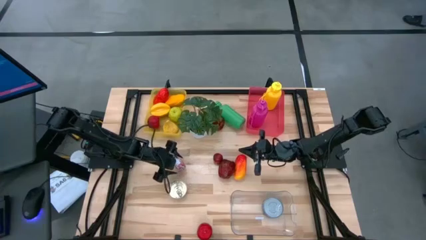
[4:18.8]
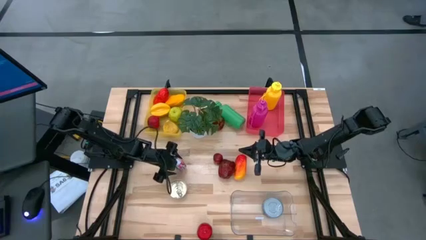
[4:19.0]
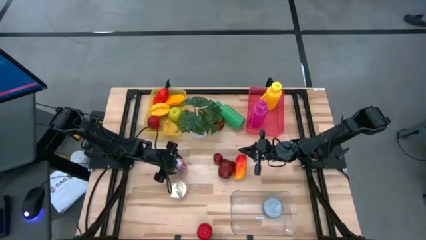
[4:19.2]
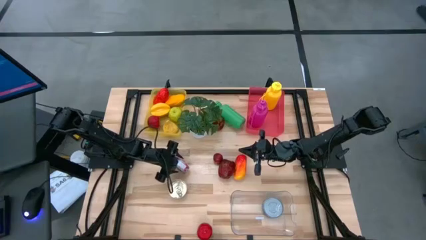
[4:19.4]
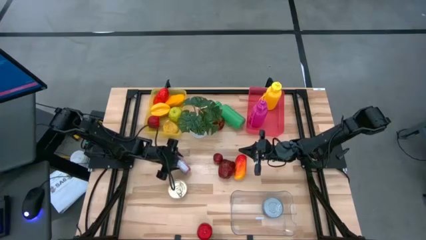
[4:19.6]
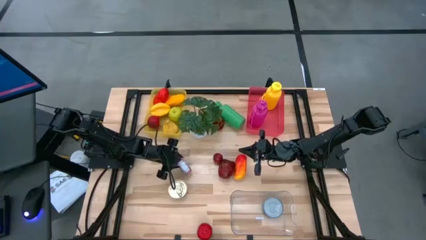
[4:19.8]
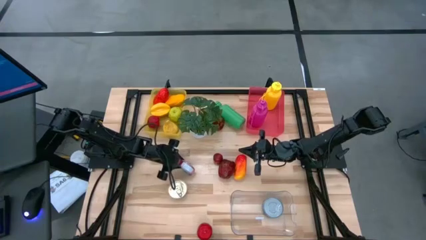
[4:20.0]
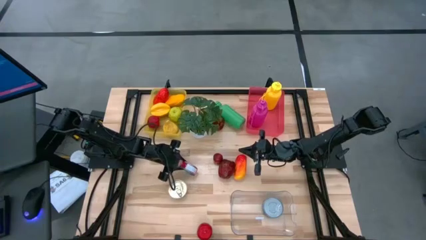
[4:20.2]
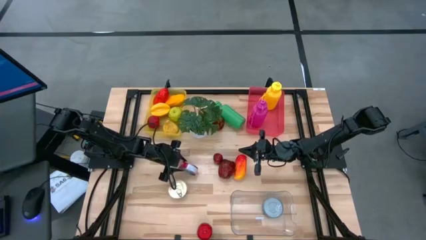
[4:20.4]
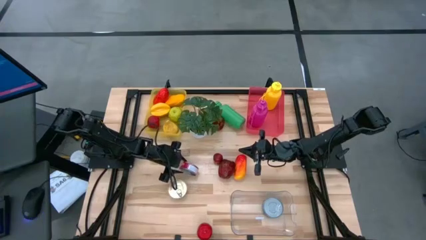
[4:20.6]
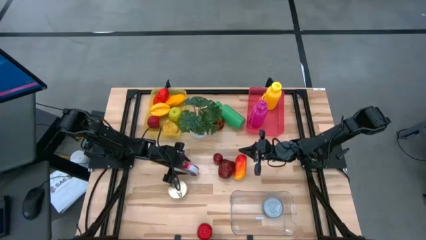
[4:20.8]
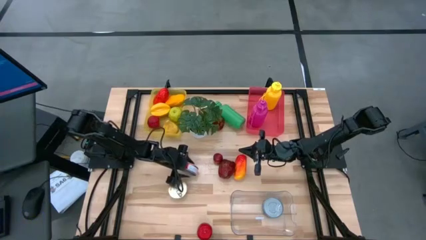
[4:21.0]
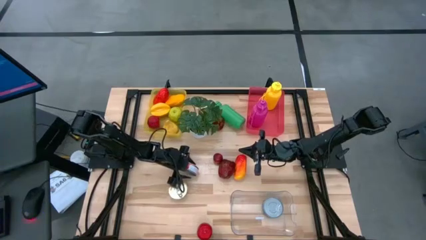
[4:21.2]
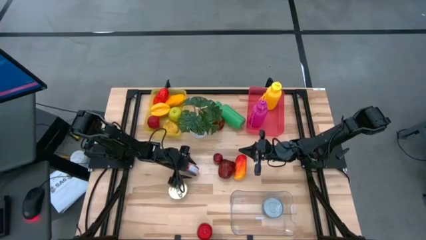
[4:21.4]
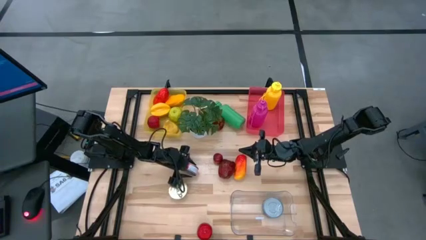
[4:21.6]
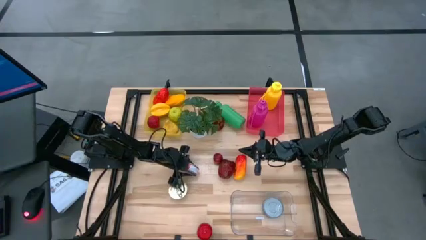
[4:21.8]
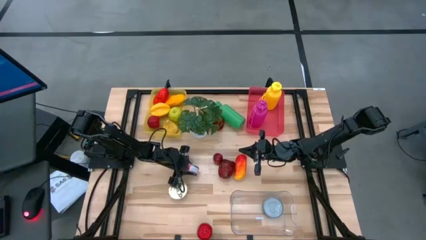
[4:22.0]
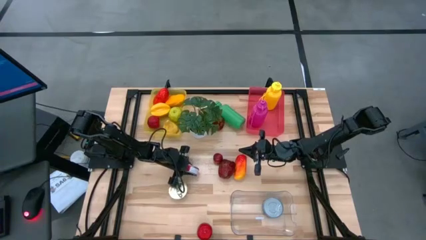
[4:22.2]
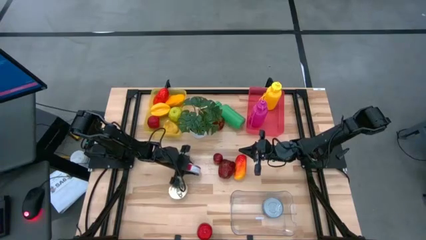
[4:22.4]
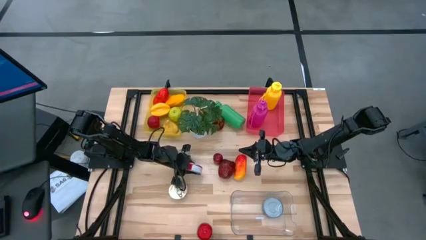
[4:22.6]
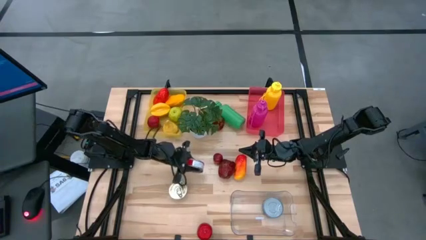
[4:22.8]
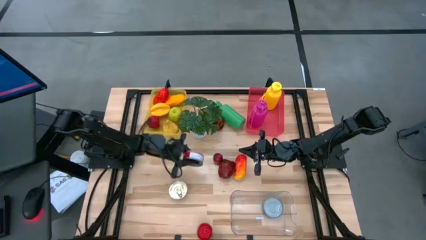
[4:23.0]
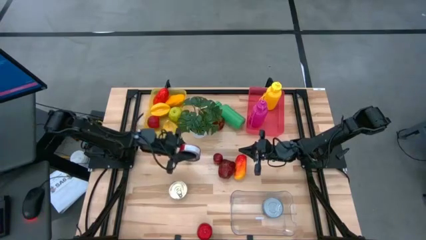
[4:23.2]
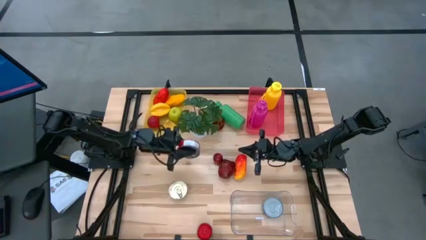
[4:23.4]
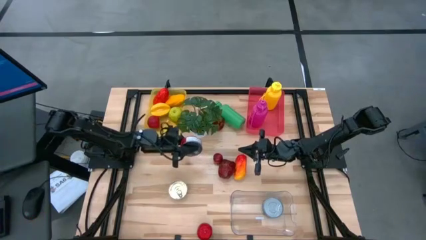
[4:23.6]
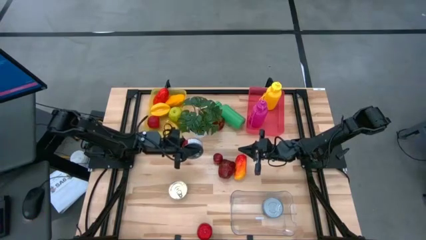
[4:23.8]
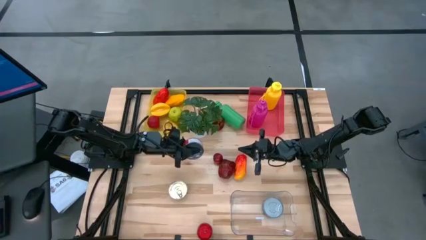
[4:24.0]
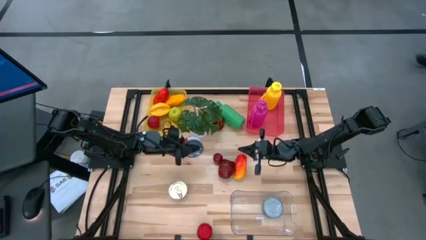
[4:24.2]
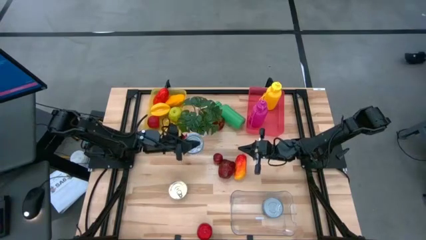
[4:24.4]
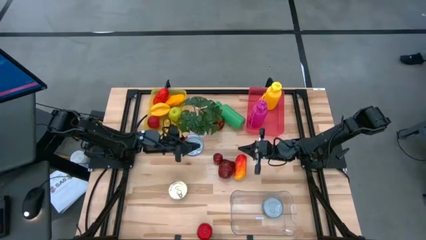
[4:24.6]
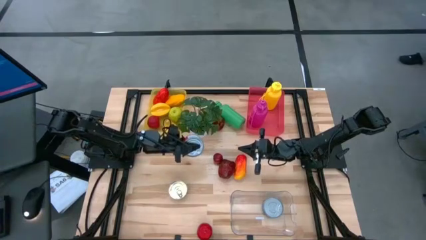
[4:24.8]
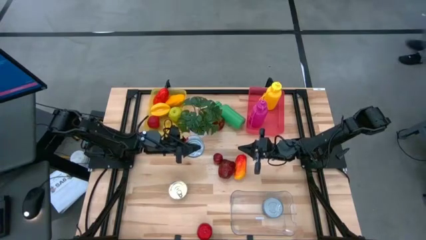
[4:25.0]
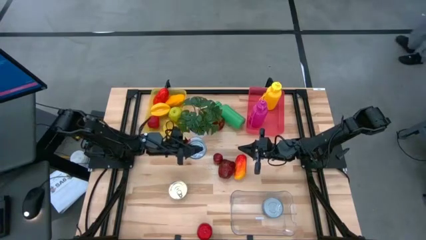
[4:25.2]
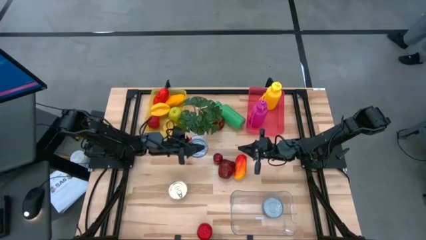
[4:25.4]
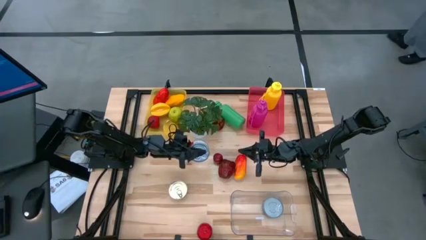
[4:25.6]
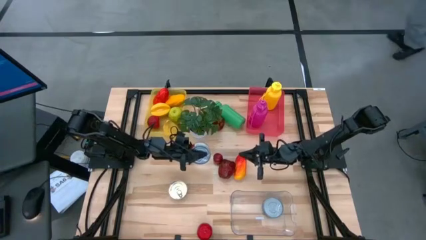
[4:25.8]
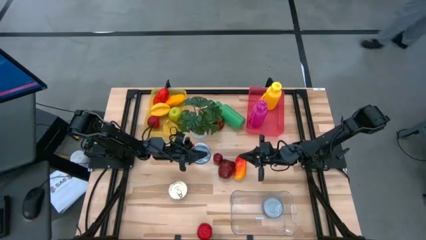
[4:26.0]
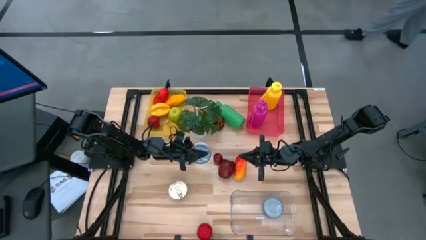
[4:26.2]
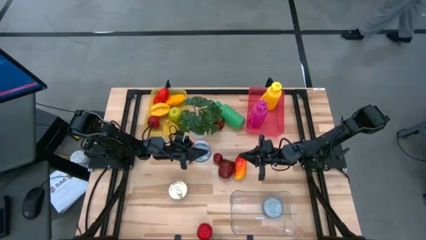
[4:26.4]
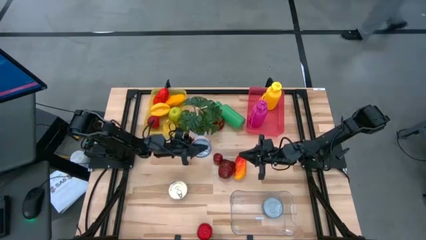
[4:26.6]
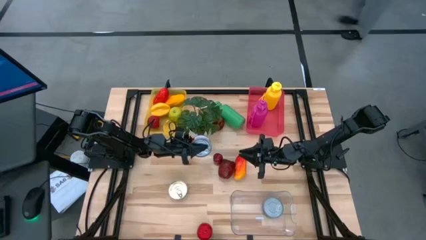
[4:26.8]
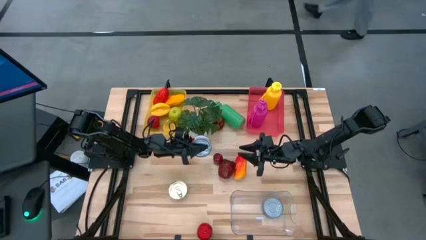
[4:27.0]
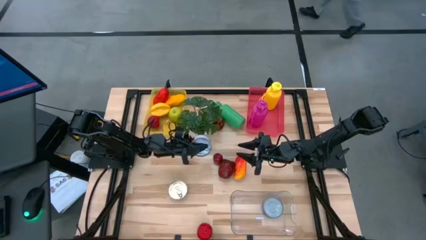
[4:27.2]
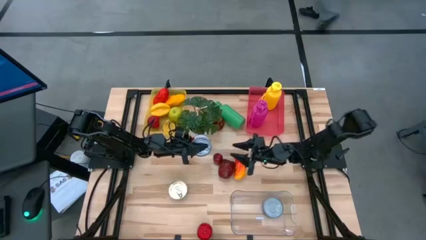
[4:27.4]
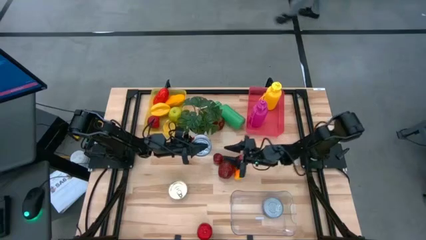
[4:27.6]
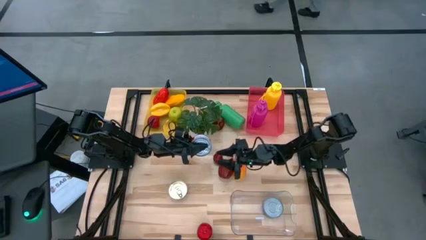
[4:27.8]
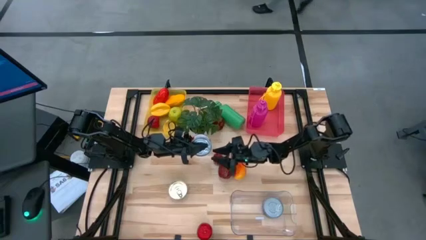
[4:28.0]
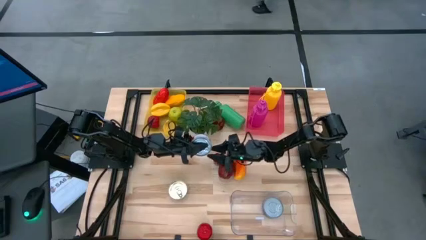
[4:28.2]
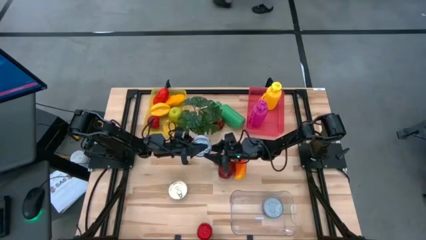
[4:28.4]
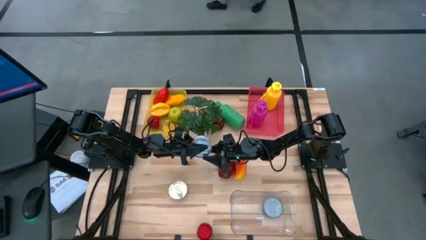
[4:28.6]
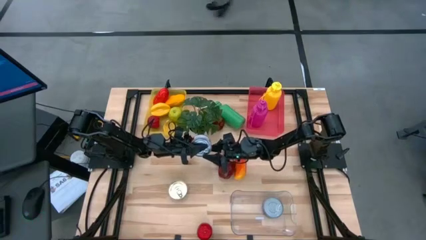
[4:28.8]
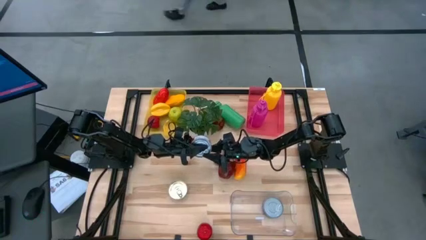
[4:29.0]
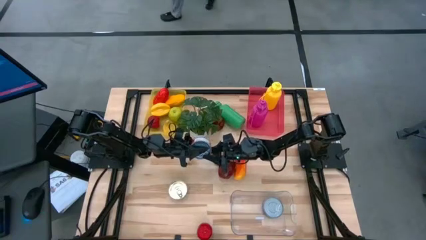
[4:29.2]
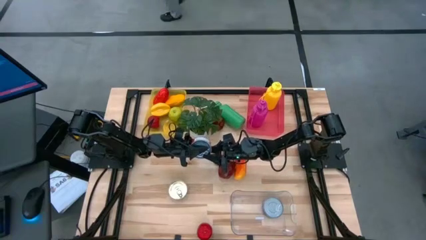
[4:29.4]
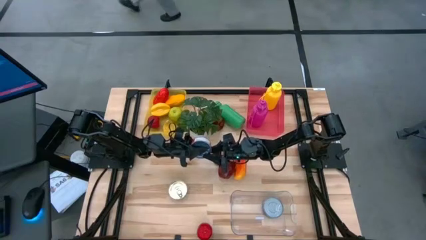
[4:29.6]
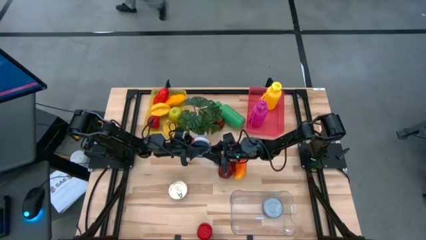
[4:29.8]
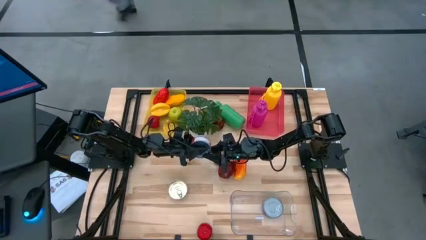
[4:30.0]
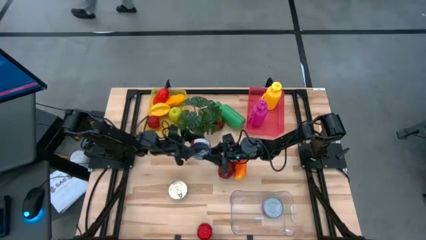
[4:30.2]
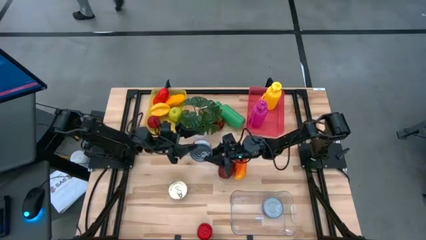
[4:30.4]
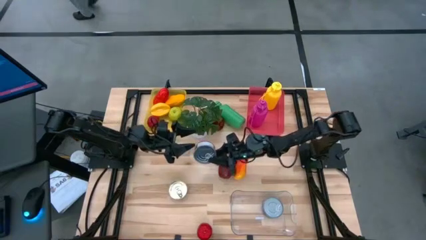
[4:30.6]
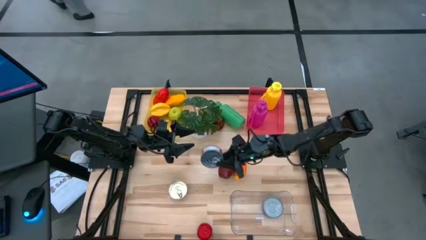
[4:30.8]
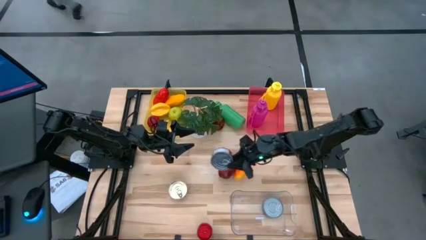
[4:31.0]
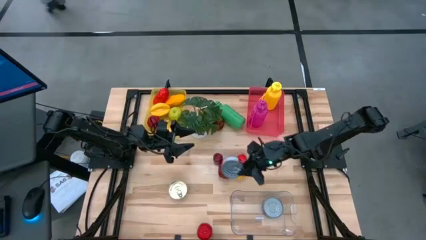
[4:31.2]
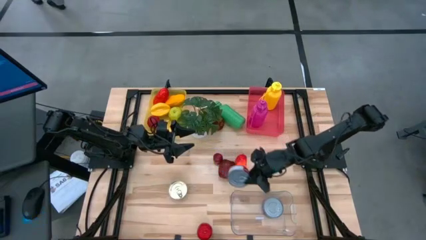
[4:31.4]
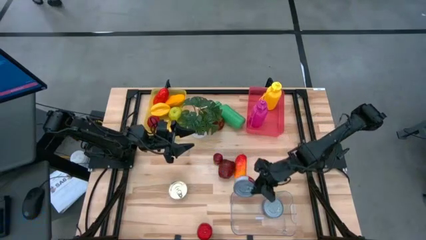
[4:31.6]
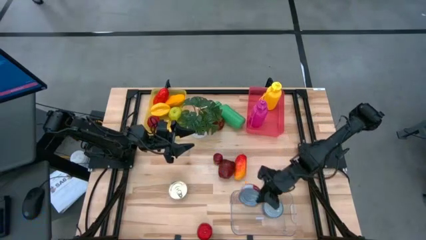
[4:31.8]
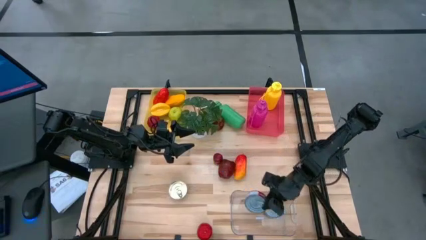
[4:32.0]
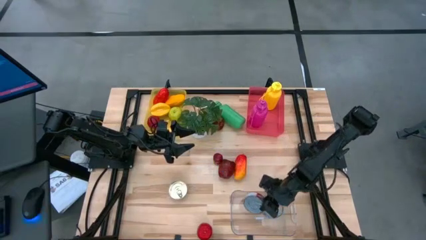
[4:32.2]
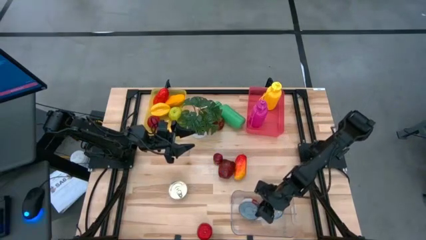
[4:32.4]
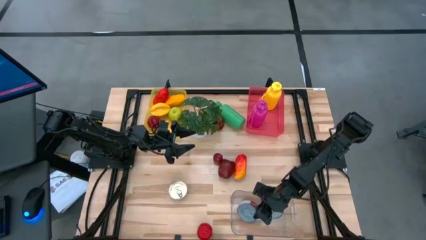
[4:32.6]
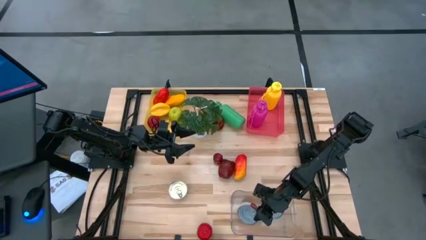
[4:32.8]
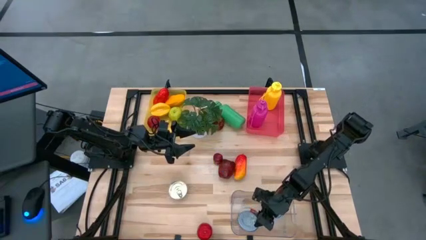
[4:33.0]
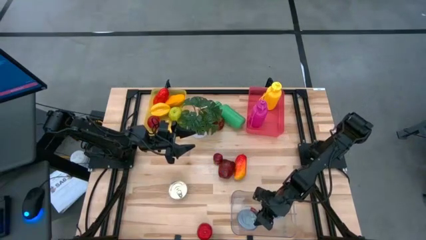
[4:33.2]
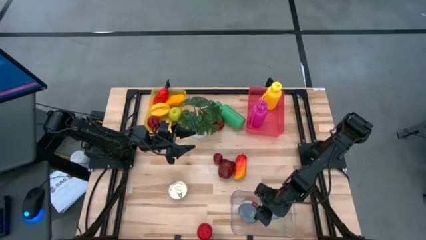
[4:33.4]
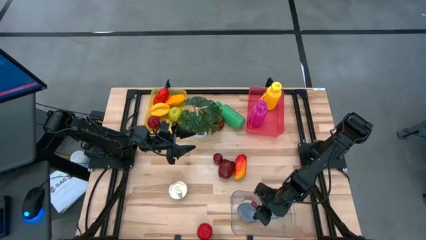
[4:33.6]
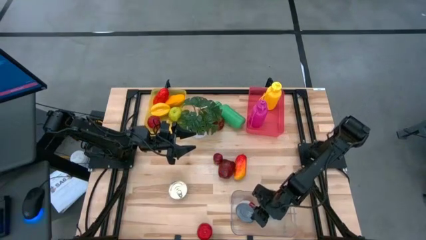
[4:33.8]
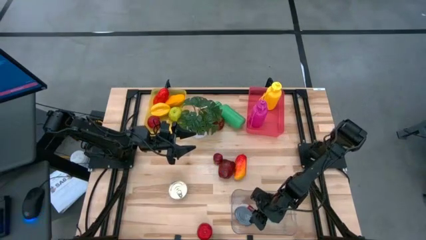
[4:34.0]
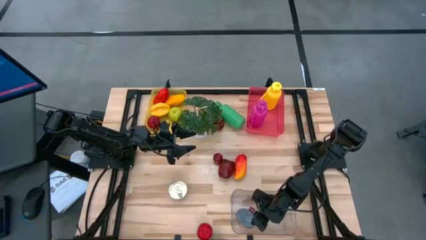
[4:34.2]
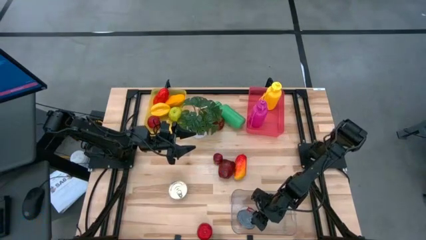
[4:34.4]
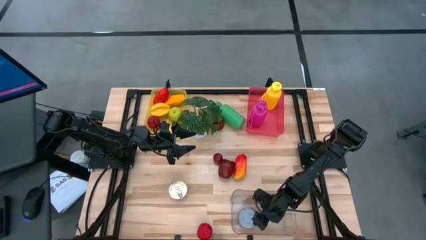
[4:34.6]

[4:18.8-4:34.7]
Task: Pick & Place Food Item
Put the red tuna can into the transparent bin
